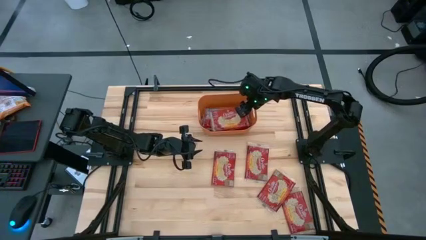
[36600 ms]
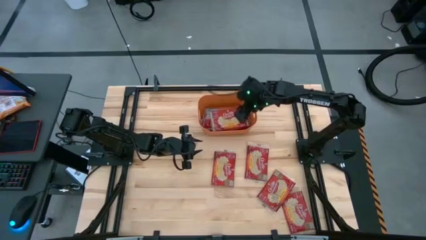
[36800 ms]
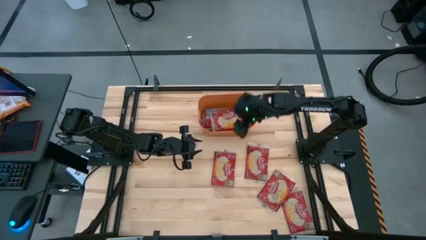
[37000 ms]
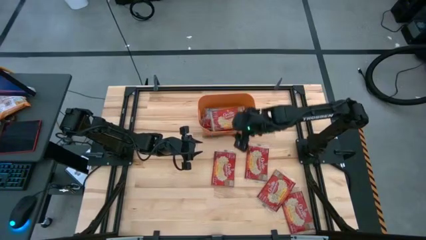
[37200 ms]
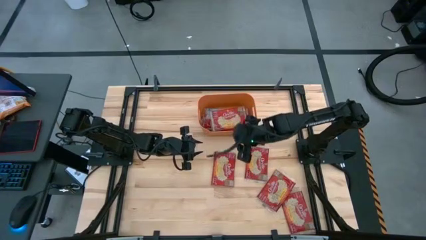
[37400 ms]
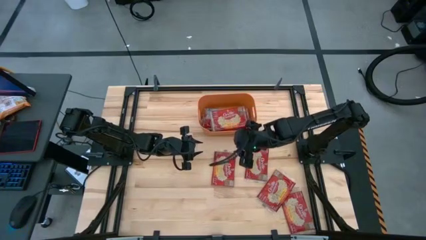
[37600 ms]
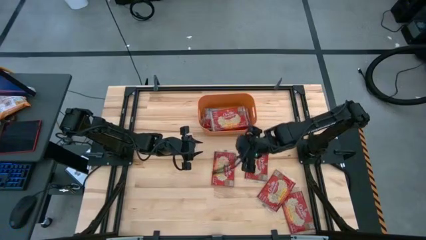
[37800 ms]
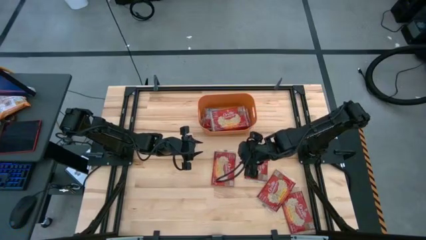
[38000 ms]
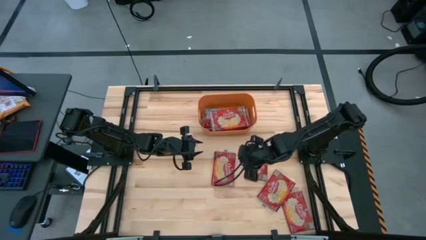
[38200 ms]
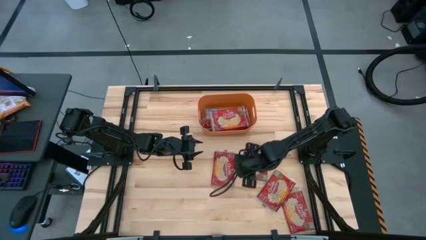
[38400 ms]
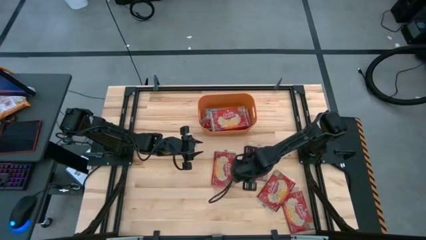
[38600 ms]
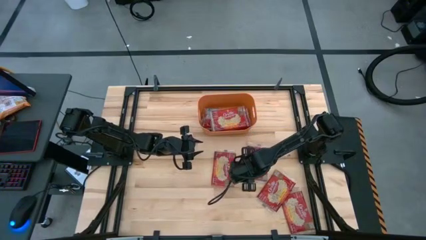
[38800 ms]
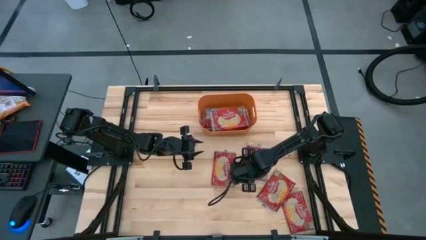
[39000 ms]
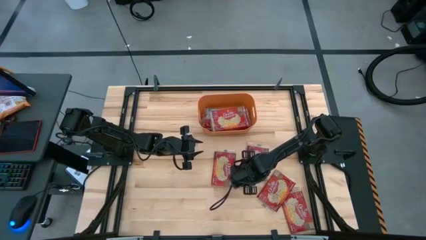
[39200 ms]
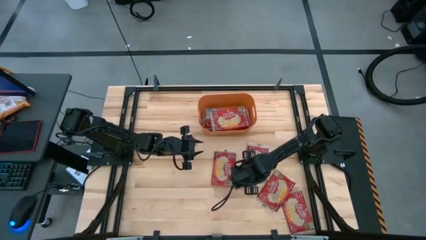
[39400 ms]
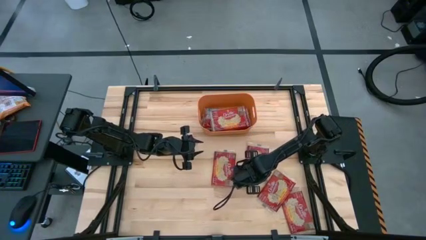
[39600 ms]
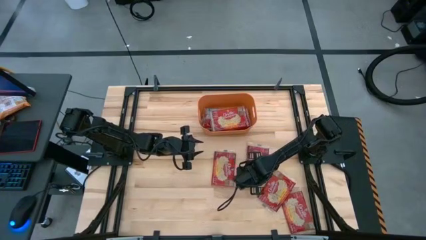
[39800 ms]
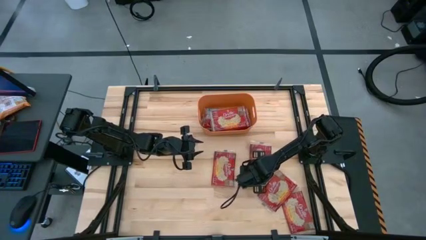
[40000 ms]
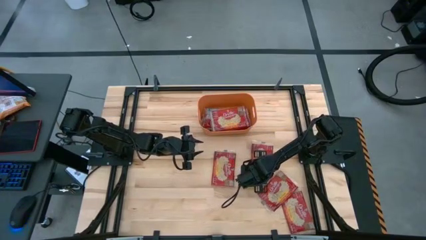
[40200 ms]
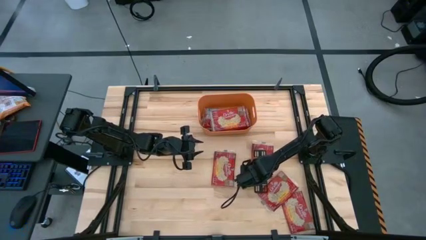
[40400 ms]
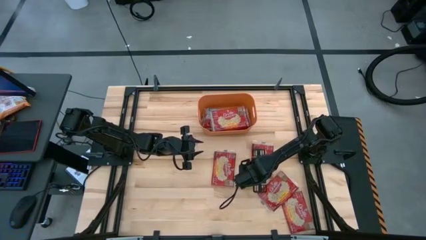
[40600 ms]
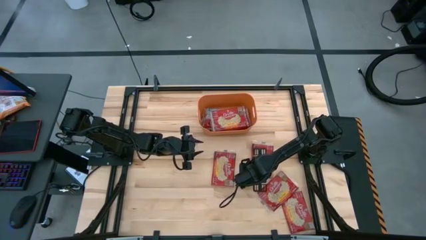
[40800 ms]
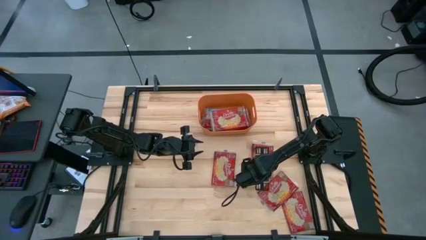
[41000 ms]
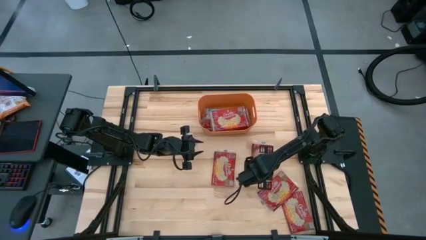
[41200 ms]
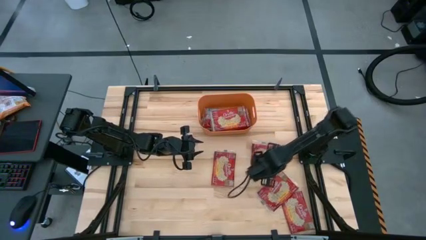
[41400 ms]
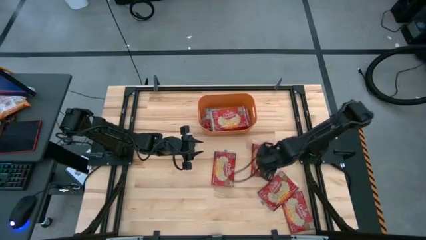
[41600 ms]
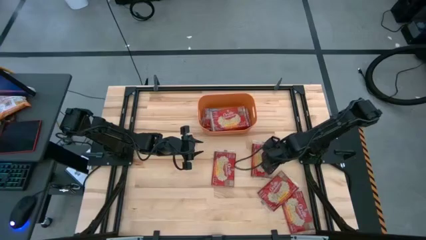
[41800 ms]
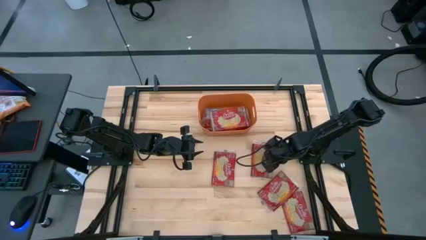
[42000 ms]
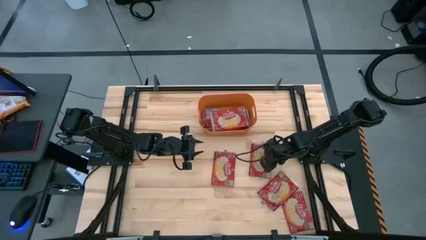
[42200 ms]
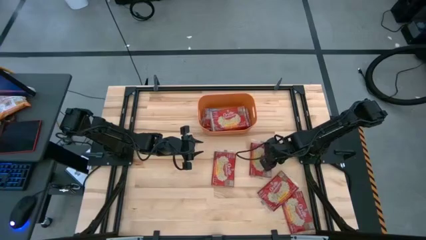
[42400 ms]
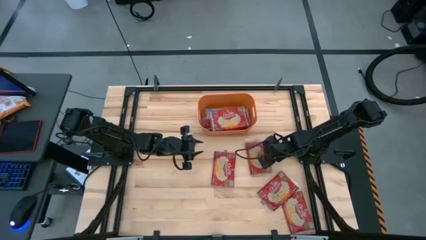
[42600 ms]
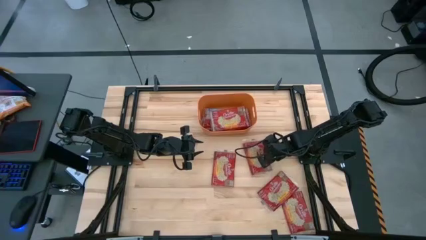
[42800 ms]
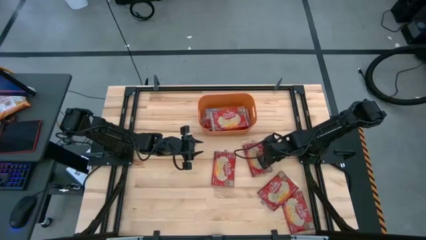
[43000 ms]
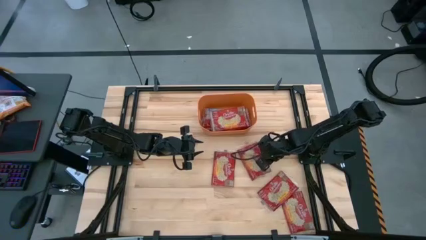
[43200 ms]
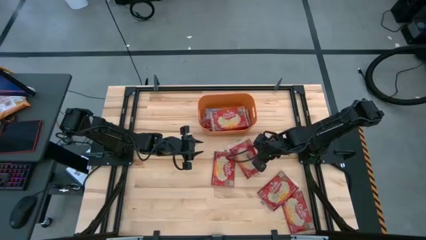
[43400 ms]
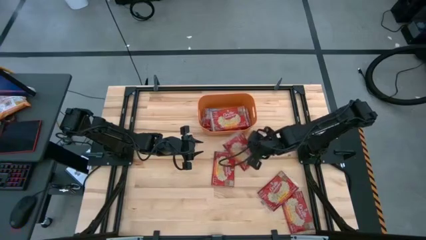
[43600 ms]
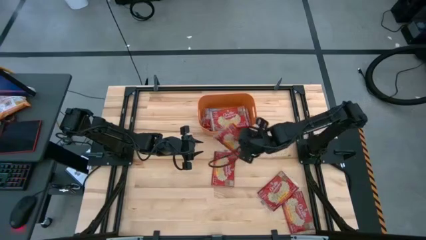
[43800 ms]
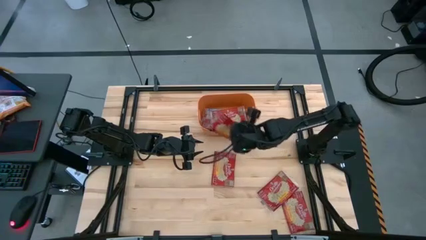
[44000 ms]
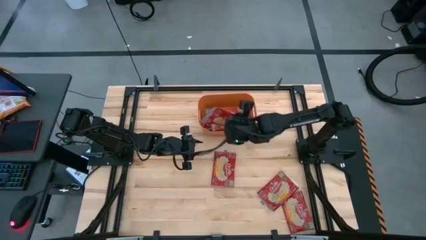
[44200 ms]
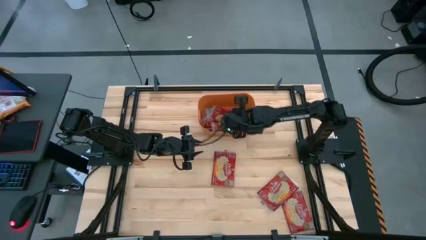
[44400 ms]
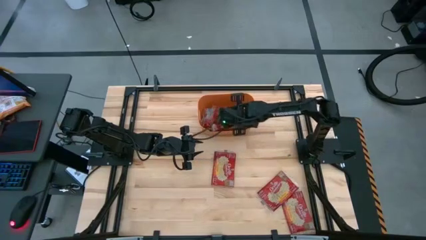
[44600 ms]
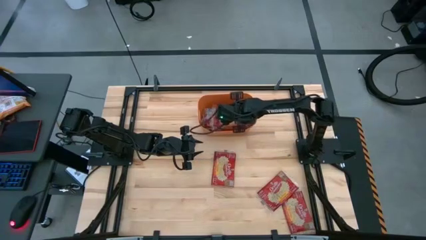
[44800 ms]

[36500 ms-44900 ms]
Task: Sort popcorn bags into baskets
Put the red popcorn bag into the orange bin

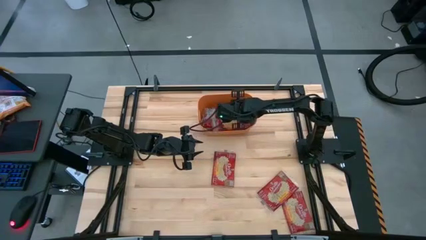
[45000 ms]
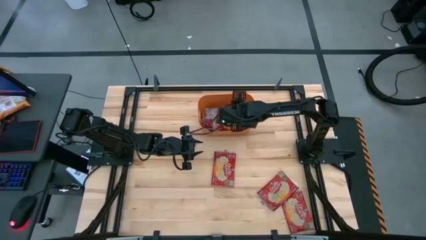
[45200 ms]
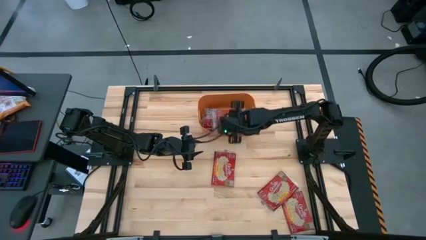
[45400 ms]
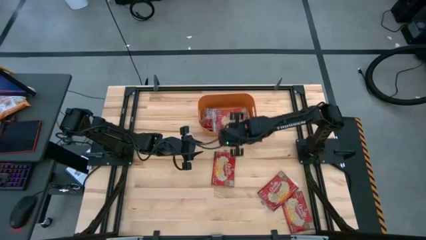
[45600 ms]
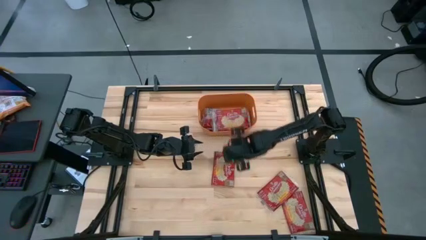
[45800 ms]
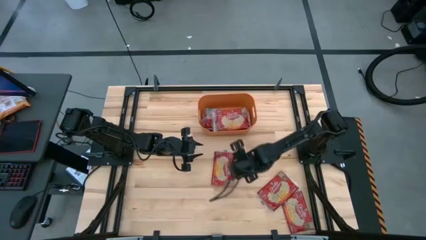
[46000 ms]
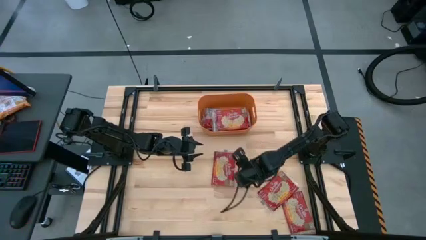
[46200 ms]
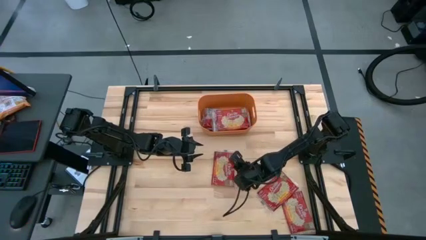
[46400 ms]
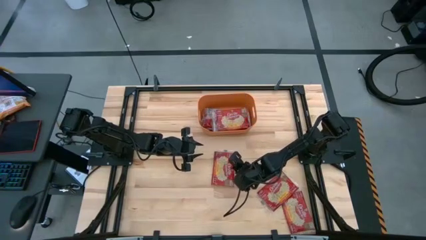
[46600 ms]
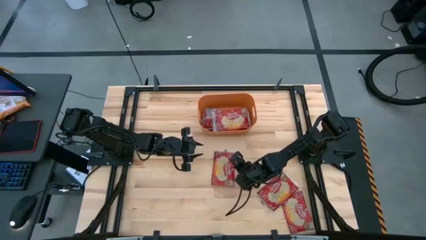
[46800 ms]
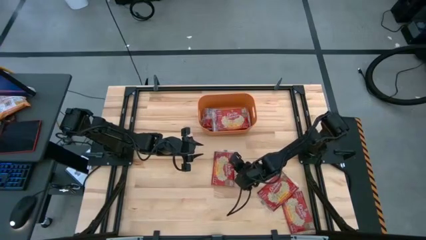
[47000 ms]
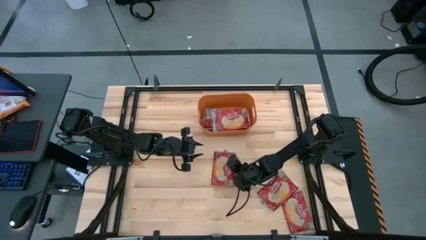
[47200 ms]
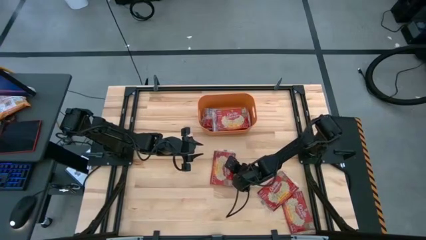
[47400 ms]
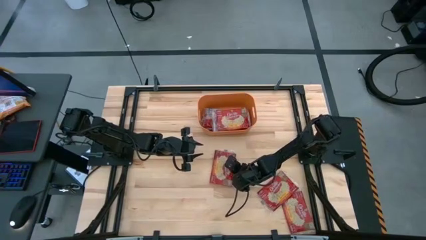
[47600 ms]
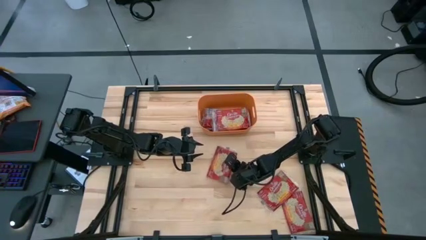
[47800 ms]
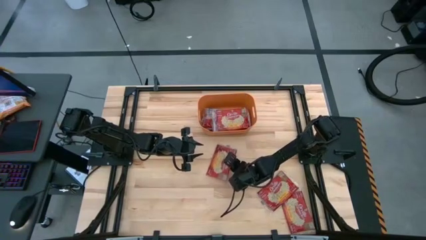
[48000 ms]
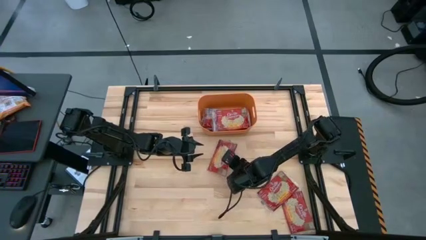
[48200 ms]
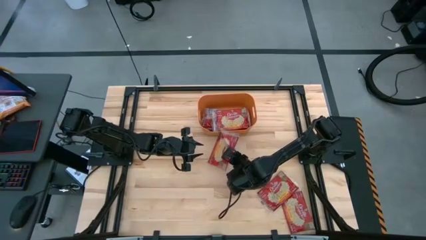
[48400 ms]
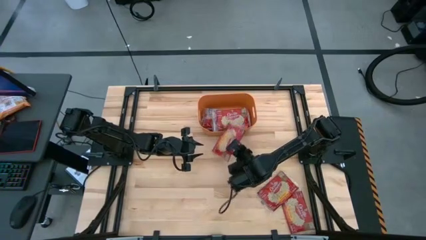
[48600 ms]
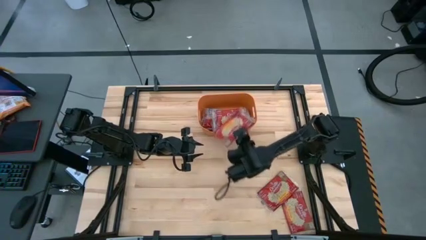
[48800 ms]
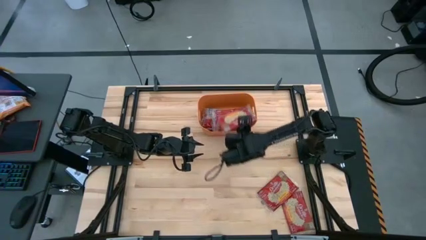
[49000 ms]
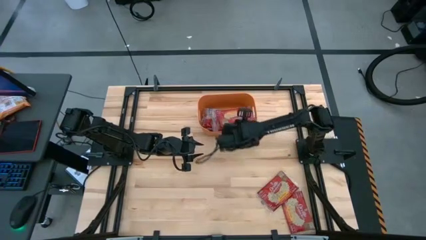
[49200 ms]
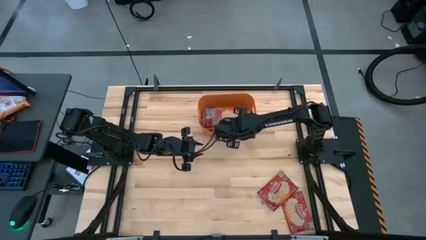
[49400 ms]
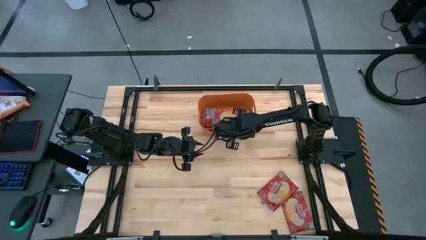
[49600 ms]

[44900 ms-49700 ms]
Put the top red popcorn bag into the orange bin
